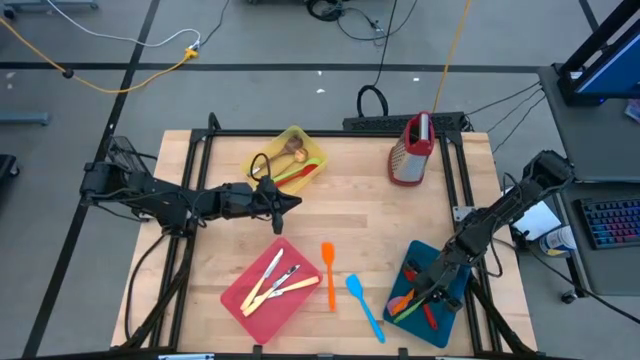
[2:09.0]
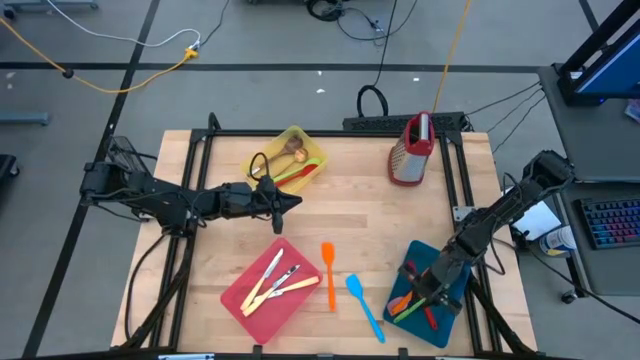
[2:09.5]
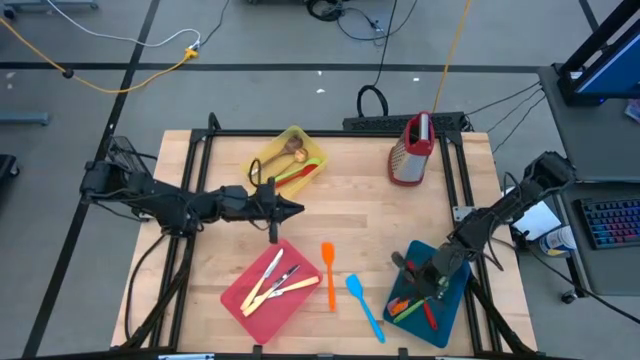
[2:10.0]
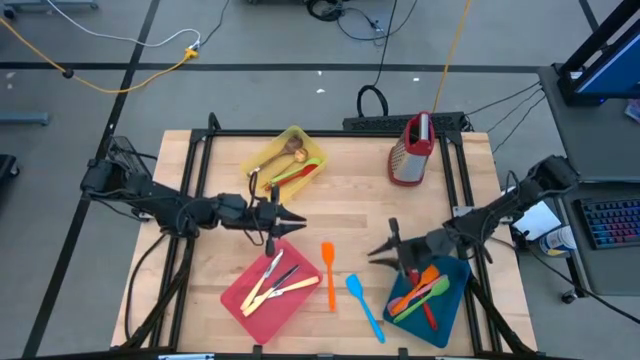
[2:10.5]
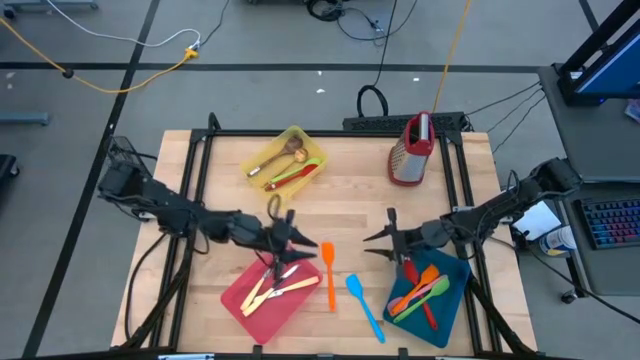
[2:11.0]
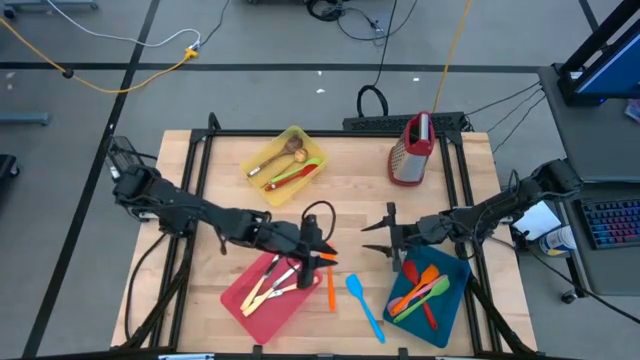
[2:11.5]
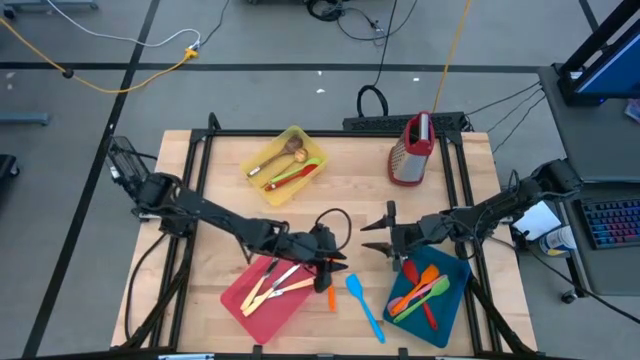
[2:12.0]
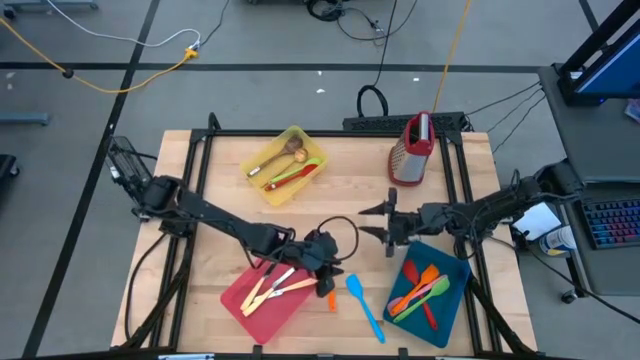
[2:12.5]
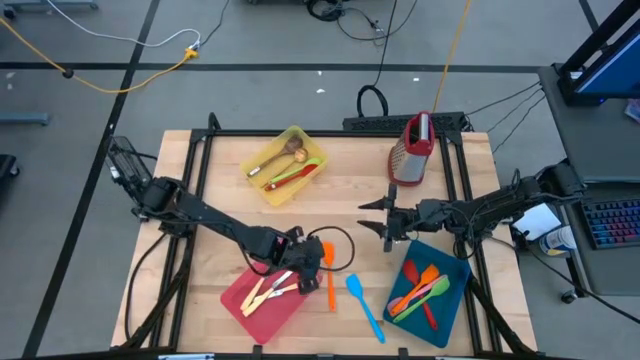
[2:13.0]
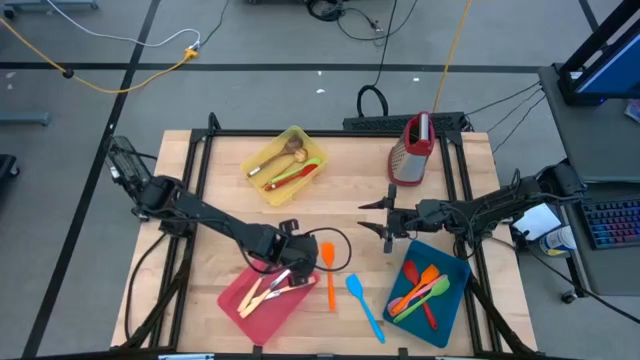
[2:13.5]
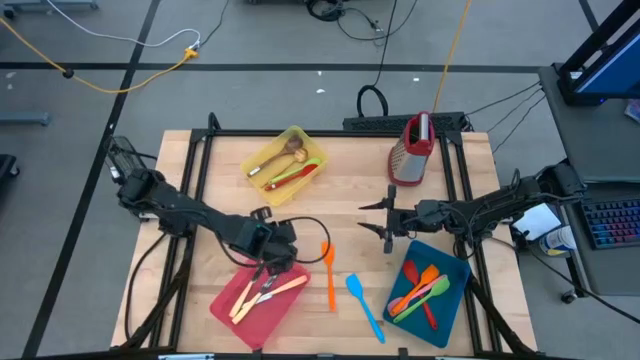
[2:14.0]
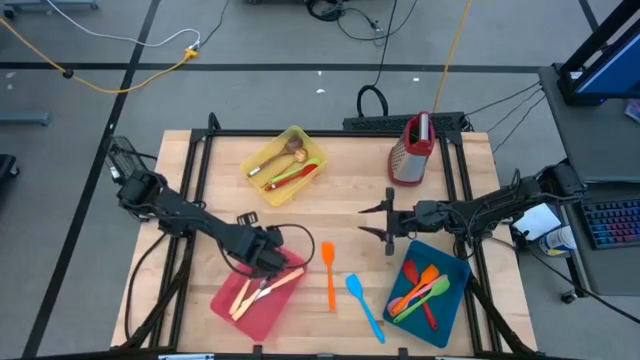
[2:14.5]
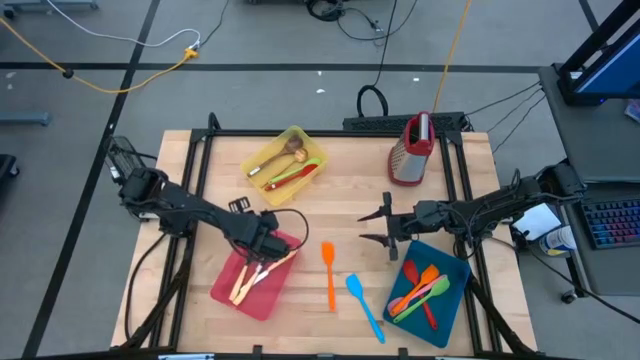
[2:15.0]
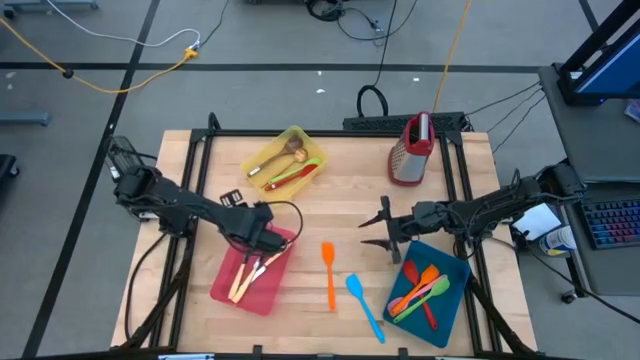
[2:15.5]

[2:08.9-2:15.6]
Task: Pick & Place Kitchen Items
Adjust the pink bin

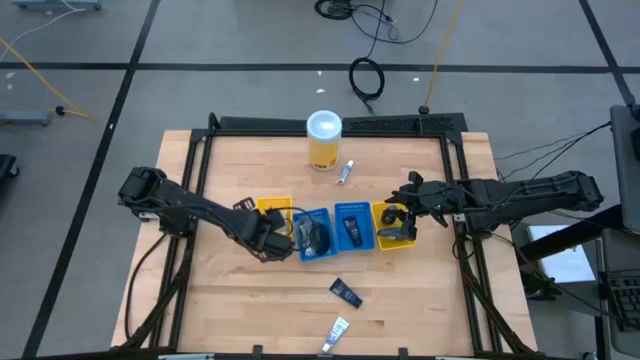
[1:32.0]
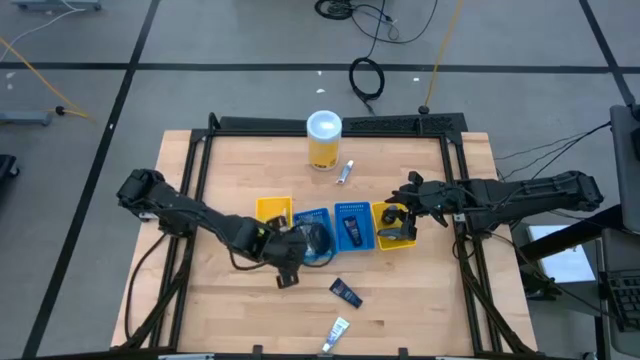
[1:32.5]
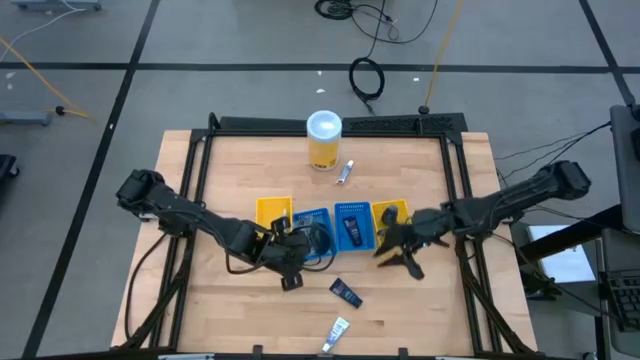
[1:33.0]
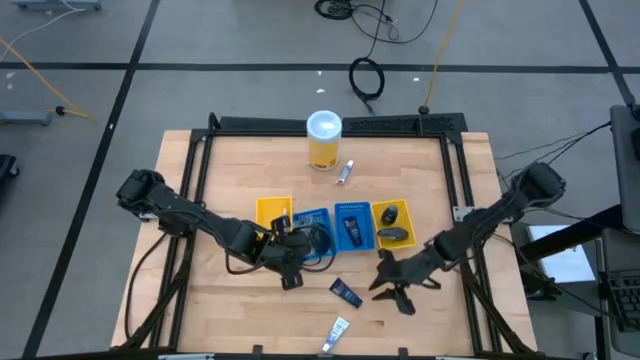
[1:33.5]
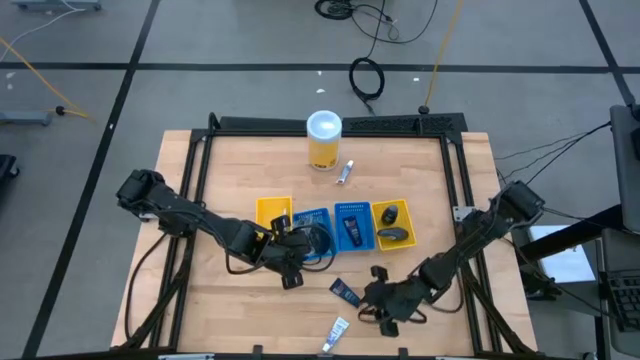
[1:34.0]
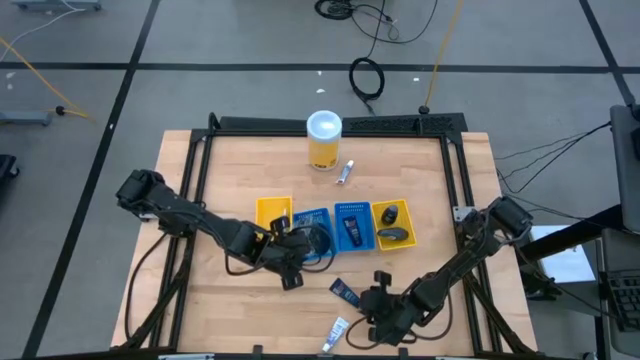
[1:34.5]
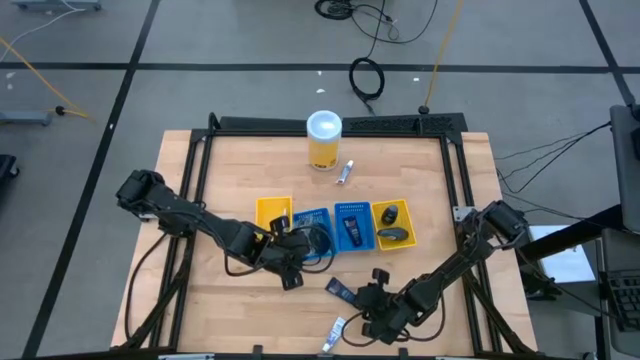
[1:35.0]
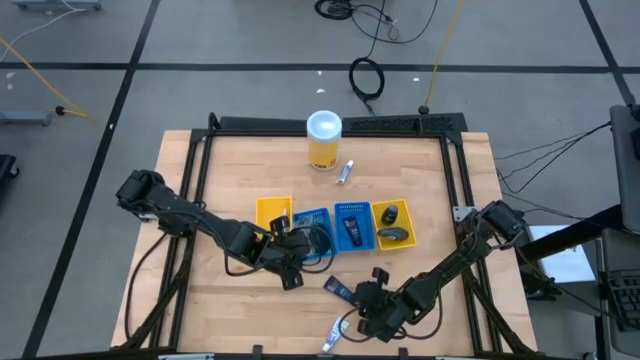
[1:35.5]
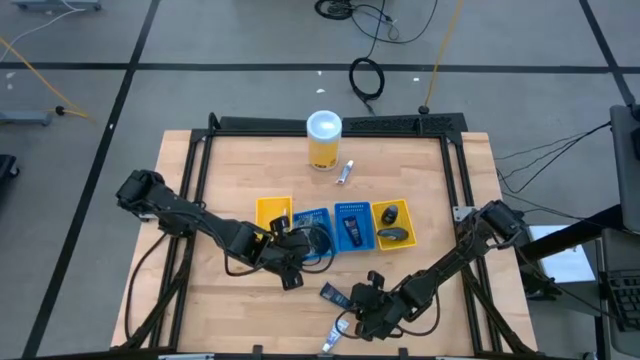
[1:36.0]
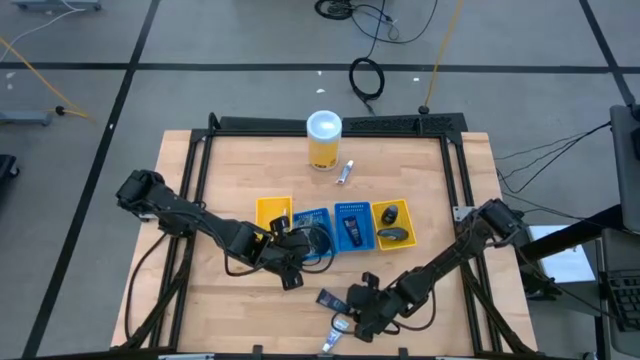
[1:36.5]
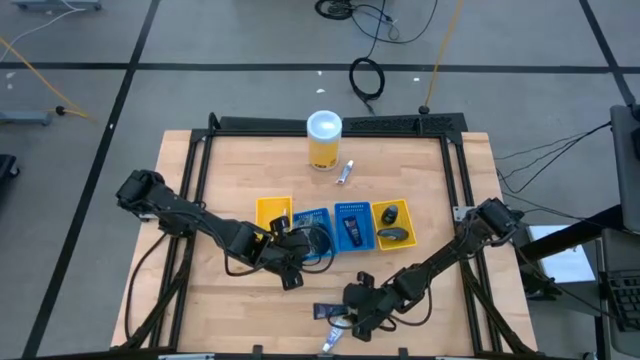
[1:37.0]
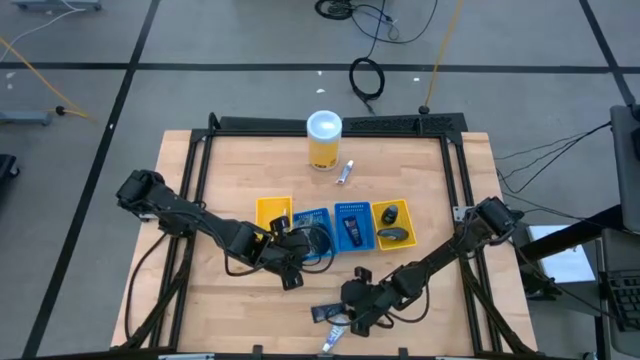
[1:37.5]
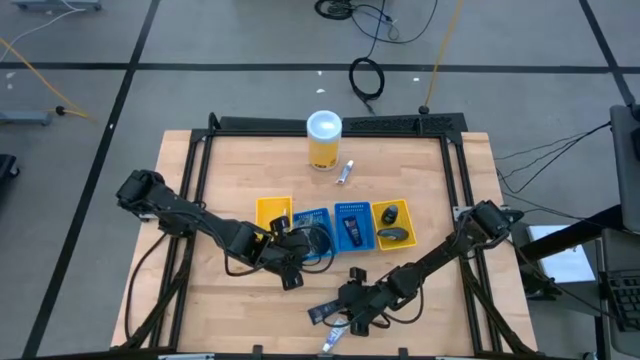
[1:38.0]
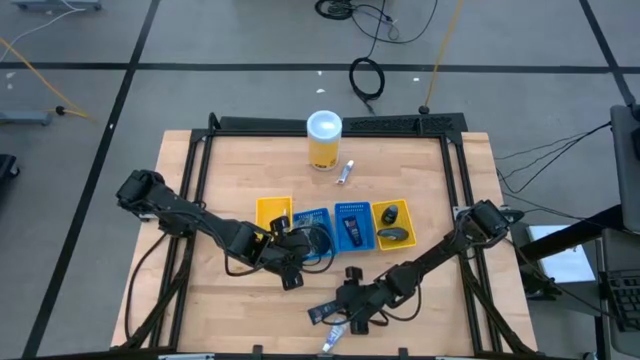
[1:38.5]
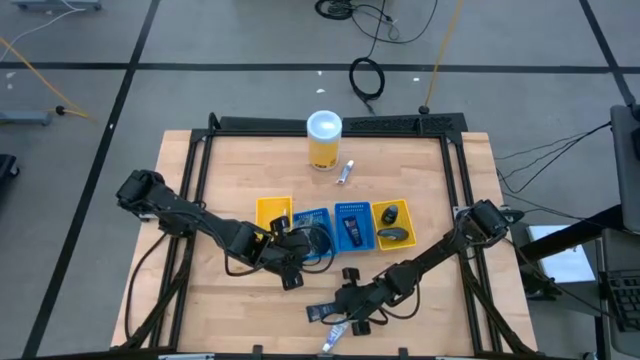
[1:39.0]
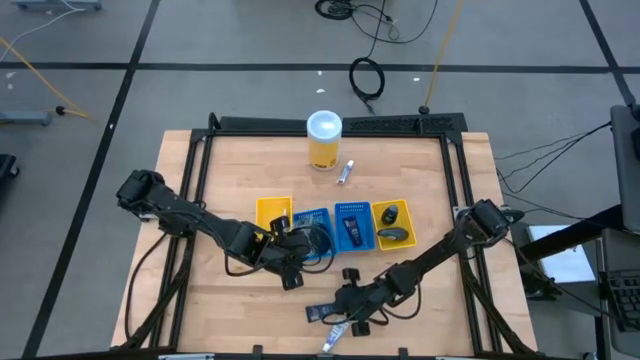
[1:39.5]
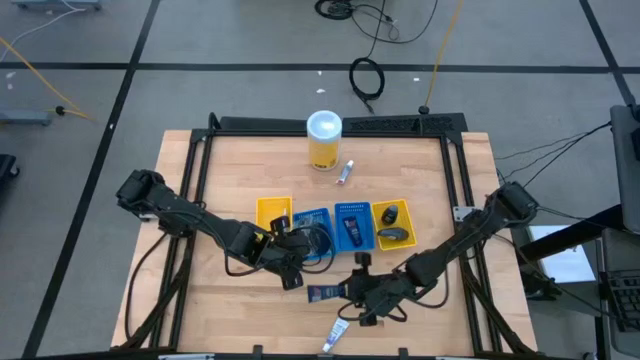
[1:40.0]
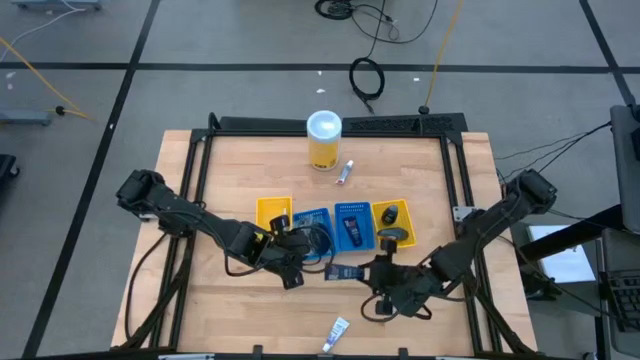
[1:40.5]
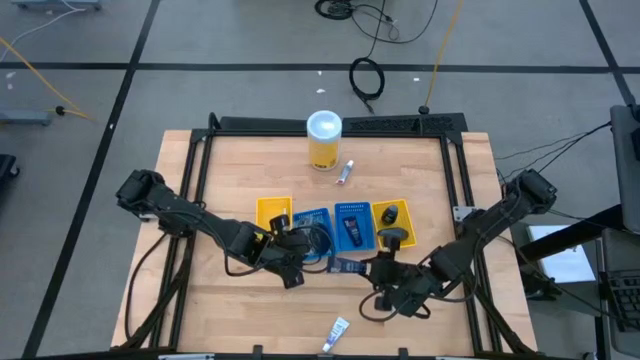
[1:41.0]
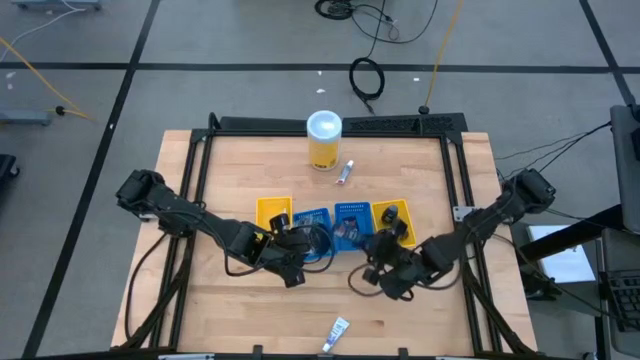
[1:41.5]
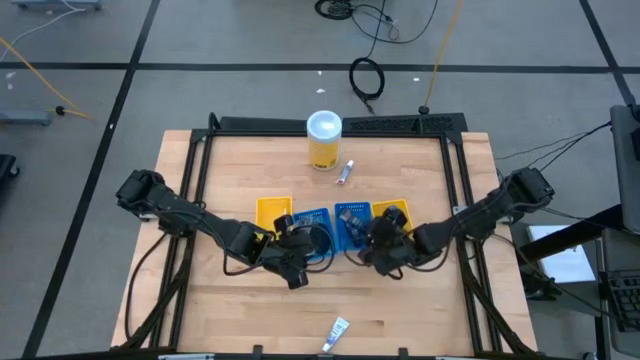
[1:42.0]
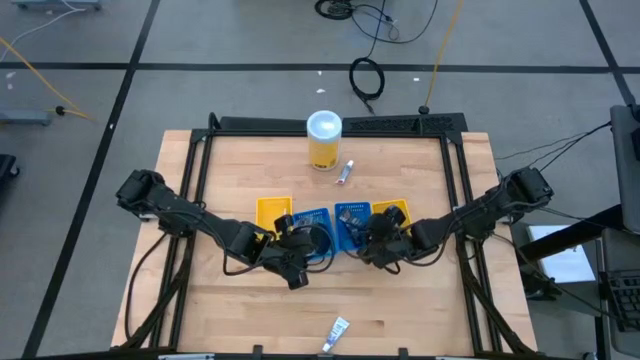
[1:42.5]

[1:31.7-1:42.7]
Task: Pick & Place Travel size toiletries
Put the blue shave cream into the right blue bin
